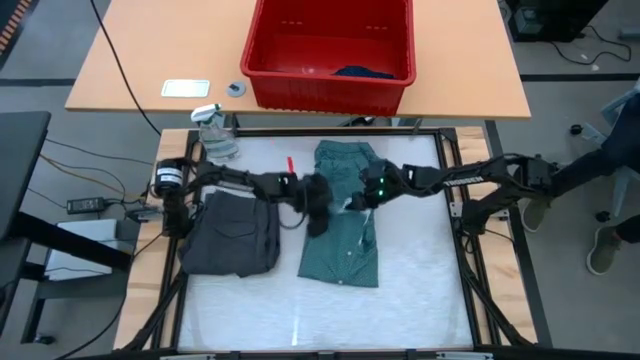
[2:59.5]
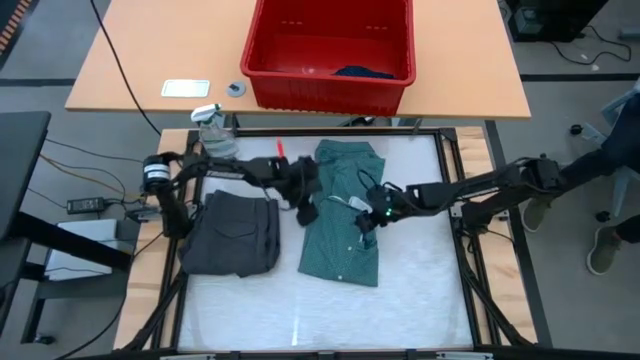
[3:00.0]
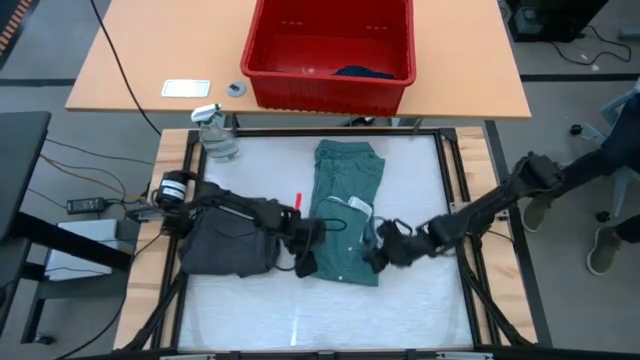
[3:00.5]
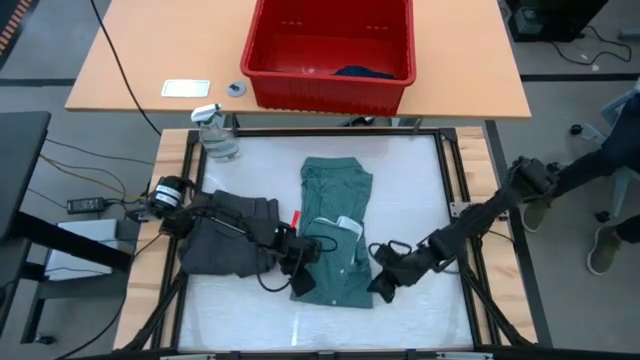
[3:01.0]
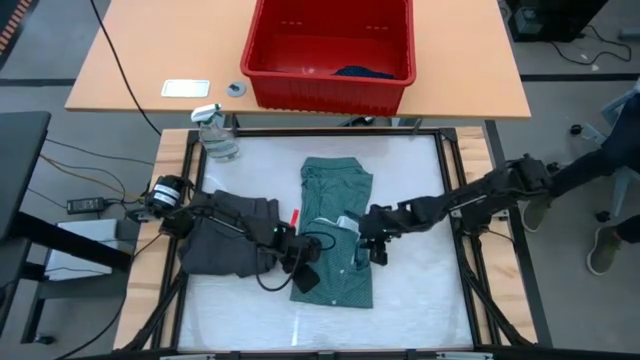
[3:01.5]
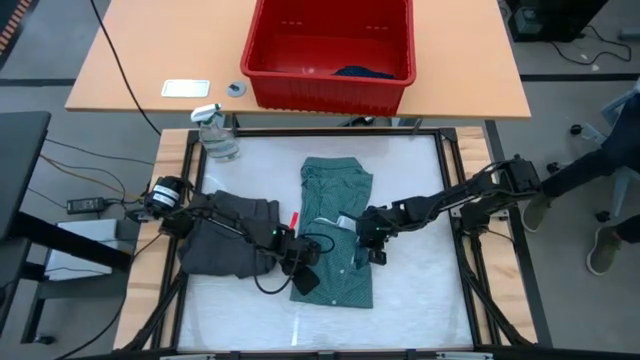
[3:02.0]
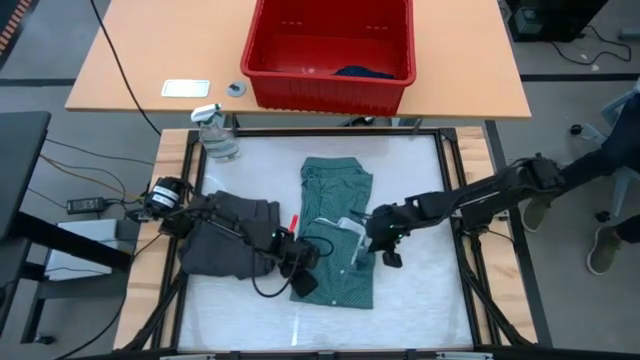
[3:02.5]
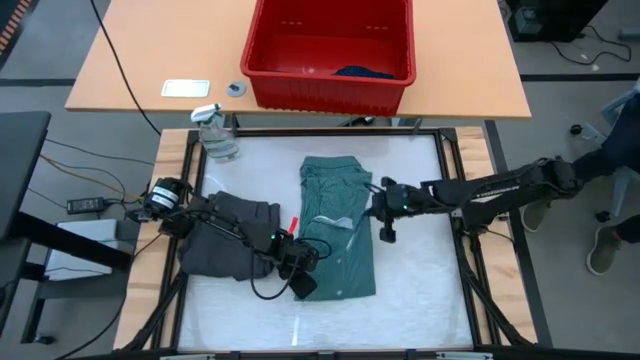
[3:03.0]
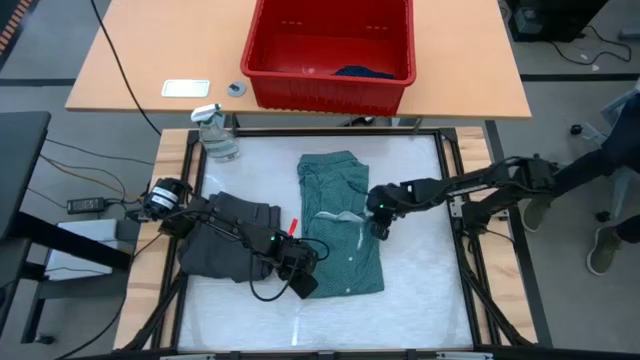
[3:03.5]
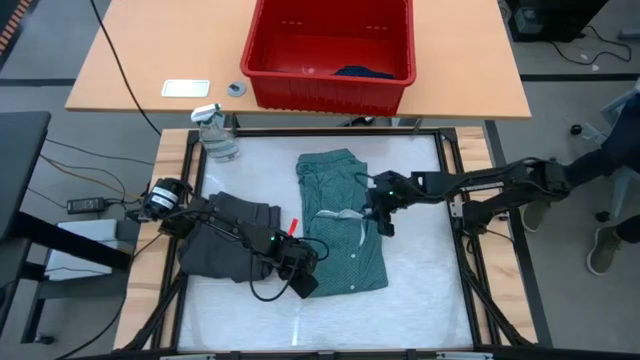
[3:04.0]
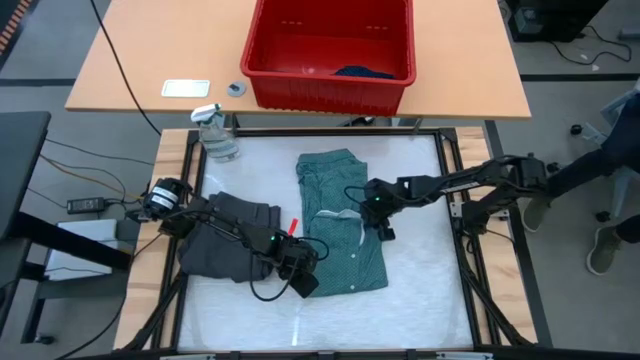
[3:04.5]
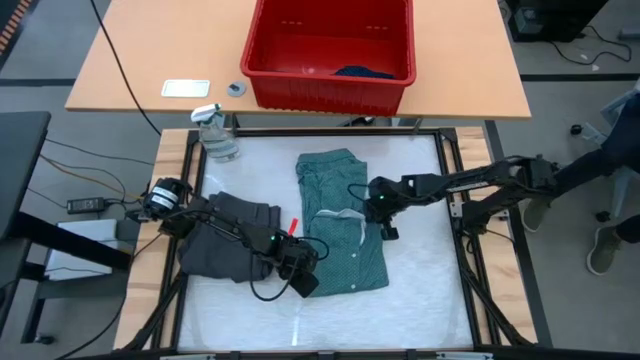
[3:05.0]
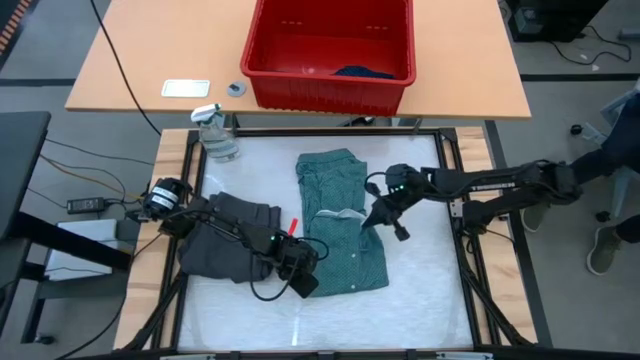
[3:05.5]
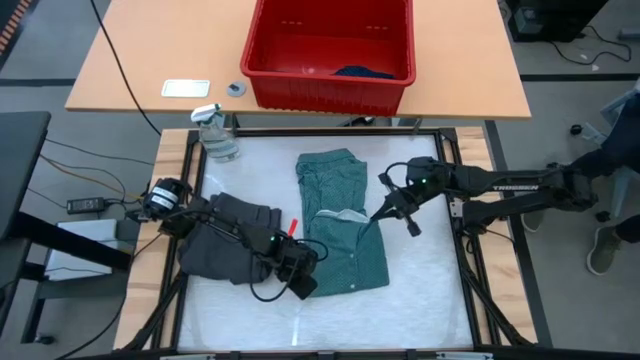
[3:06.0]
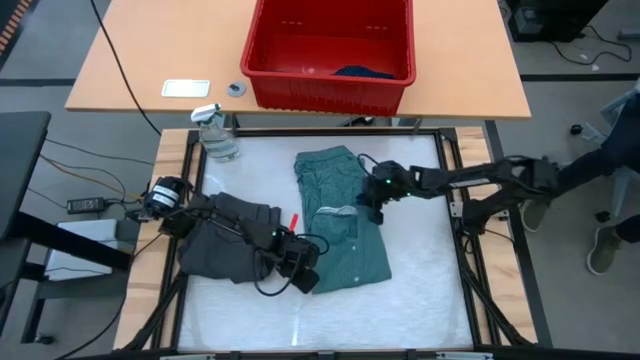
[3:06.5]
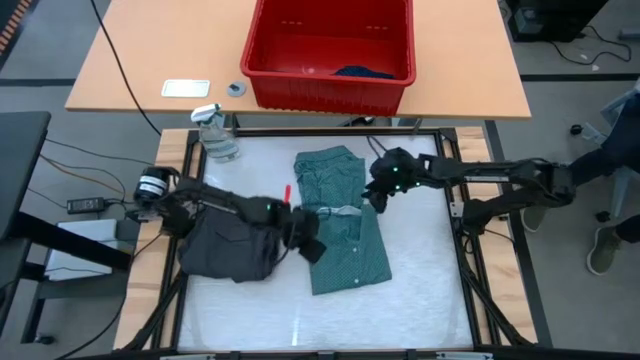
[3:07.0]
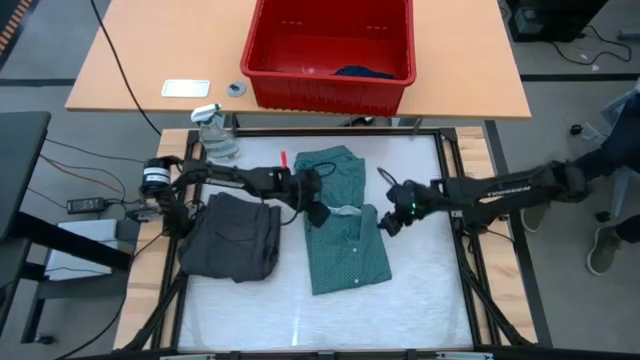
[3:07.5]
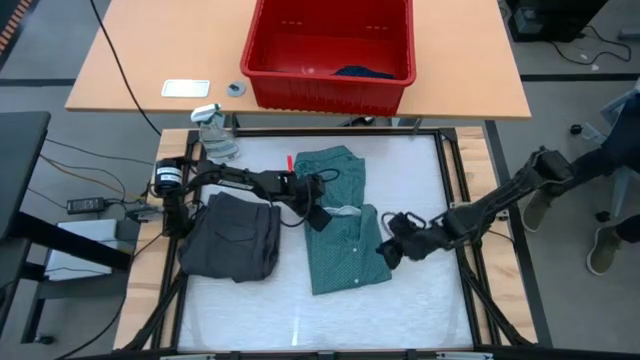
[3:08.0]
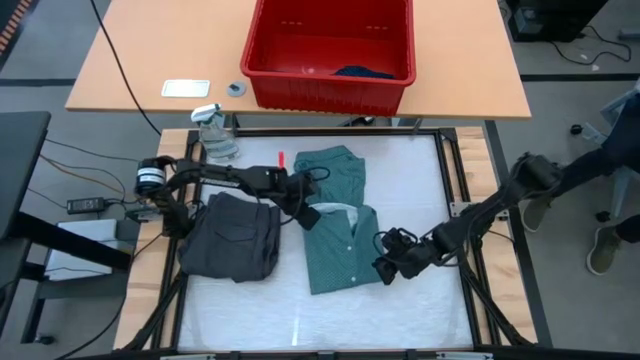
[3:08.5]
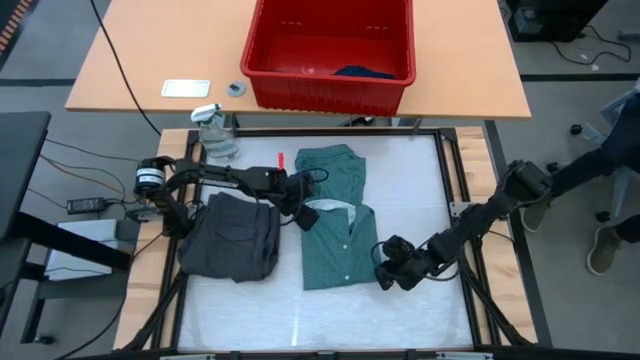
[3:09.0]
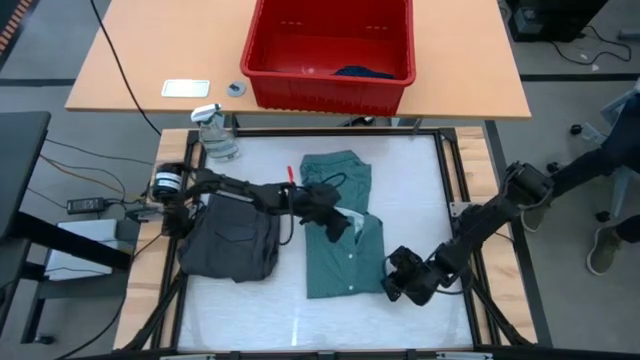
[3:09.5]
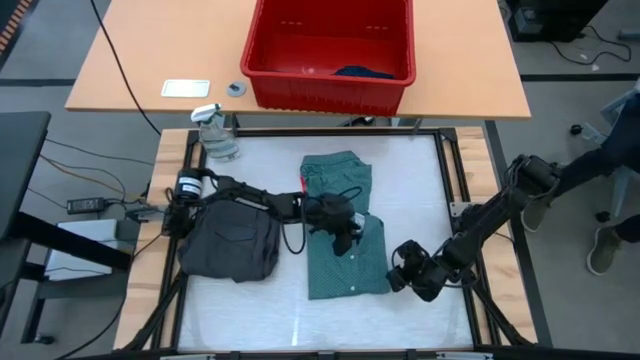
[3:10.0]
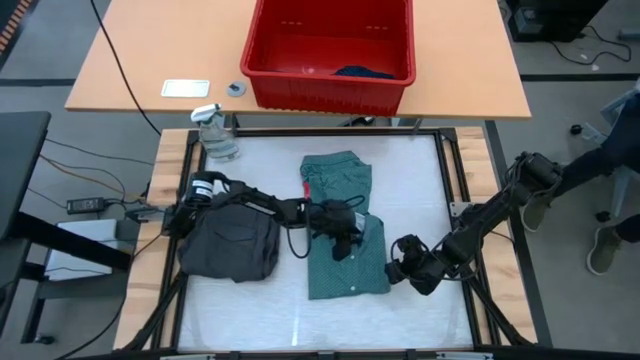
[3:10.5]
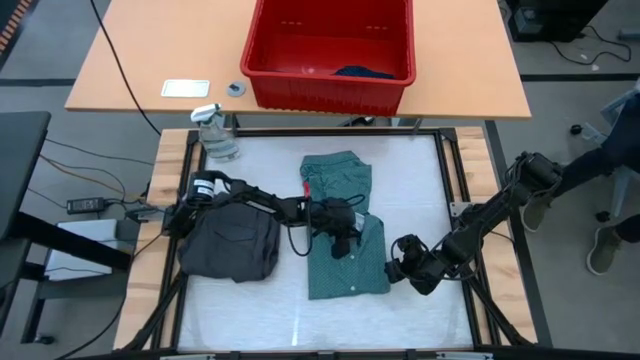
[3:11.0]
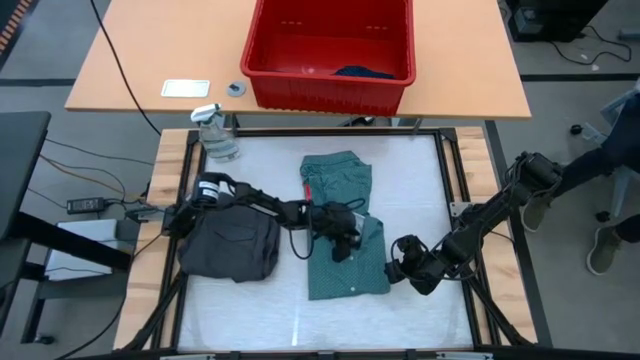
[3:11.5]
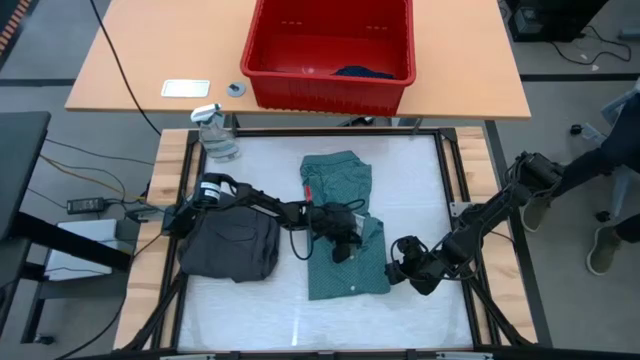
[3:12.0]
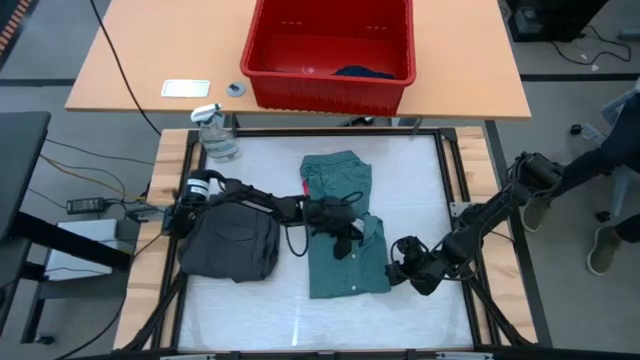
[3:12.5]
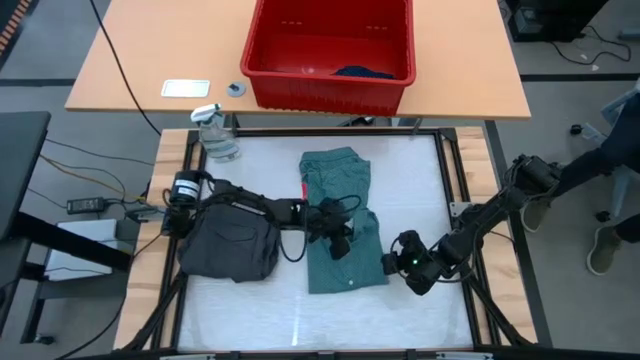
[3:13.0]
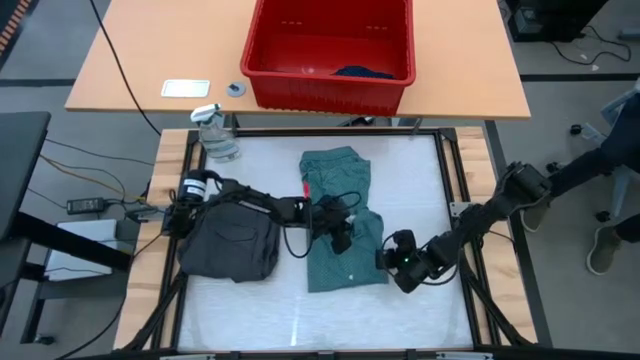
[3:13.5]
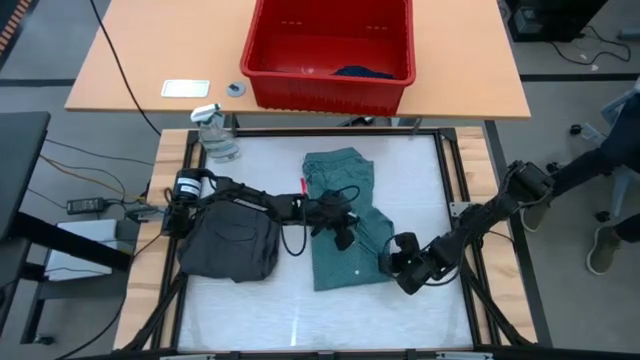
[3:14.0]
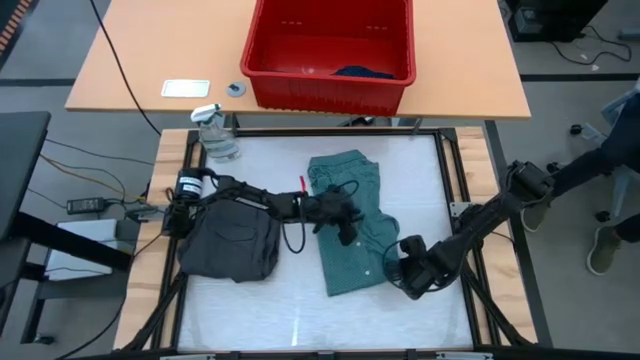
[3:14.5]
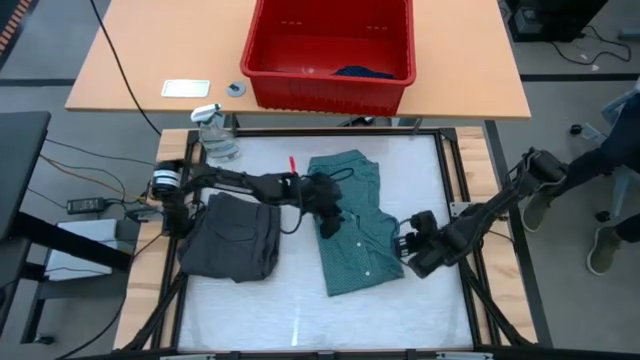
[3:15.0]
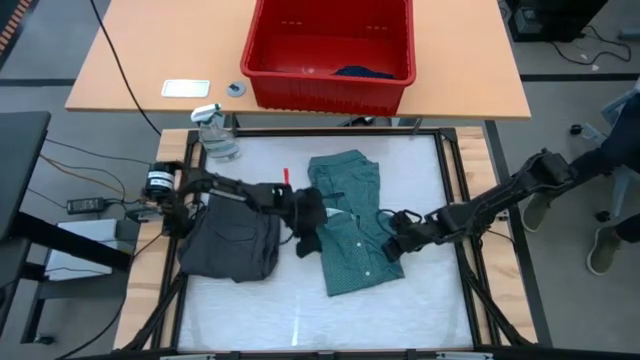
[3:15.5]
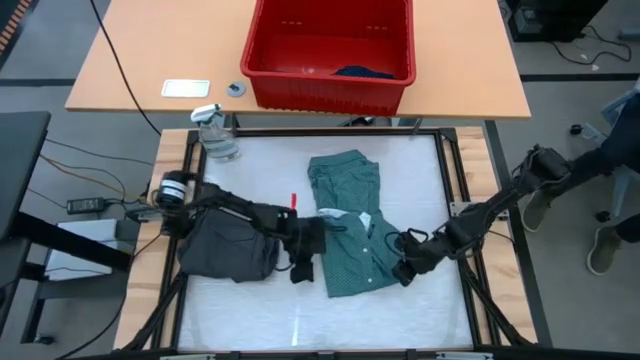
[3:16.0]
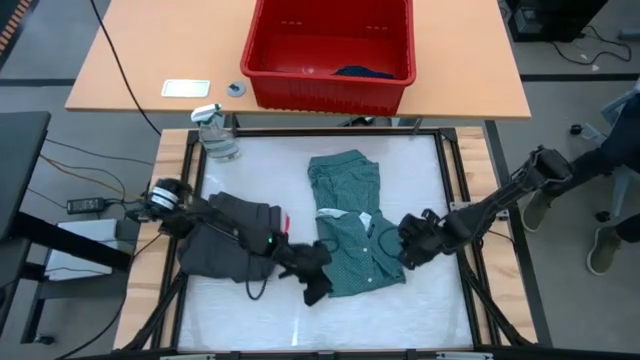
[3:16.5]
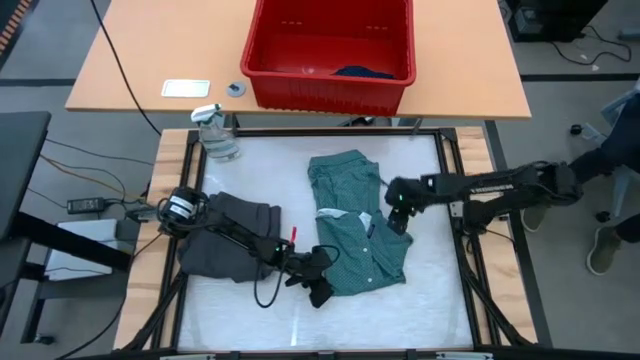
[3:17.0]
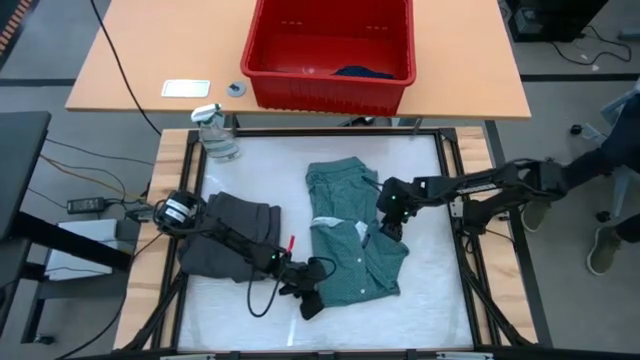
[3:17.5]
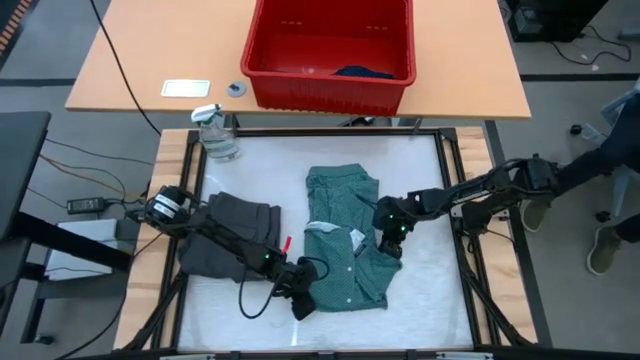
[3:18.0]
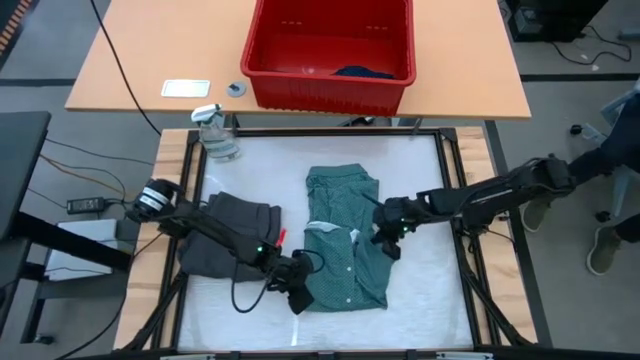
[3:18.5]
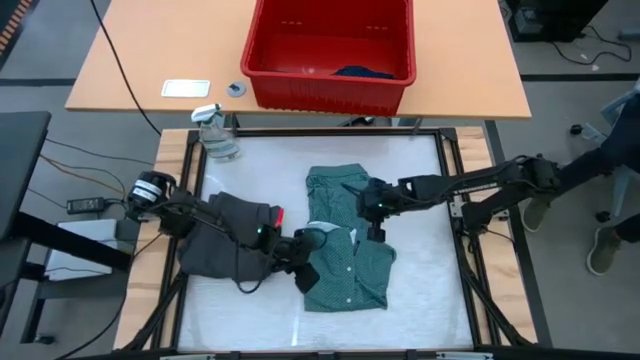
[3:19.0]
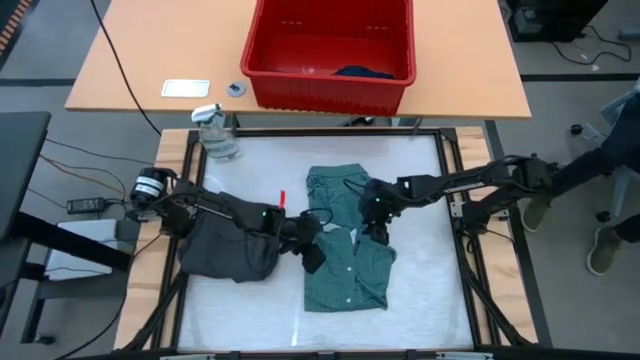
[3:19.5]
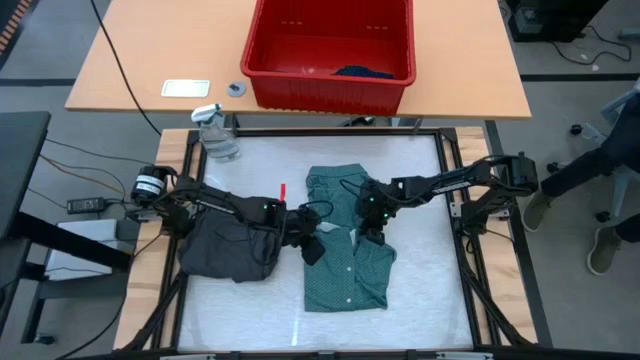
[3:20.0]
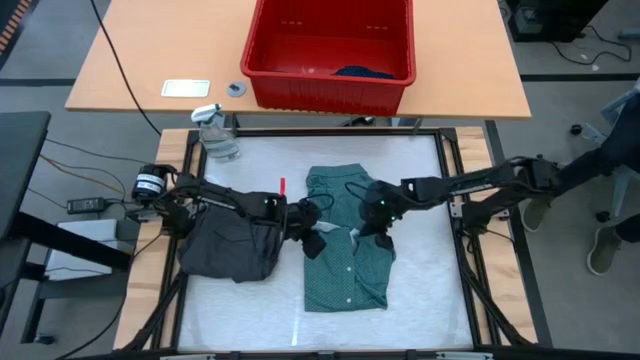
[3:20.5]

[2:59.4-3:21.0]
Task: Fold Laundry from Bin
Fold the green polo shirt on the table
